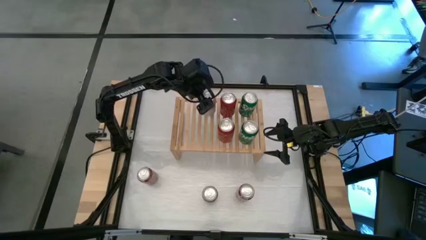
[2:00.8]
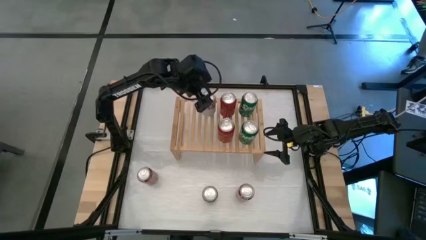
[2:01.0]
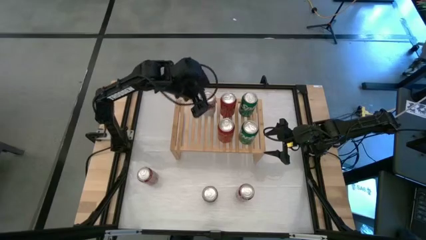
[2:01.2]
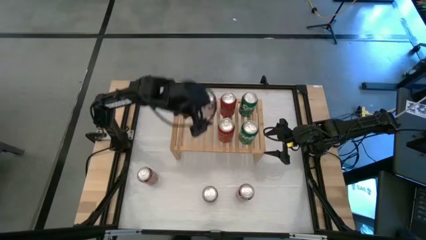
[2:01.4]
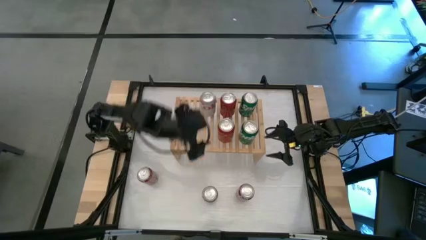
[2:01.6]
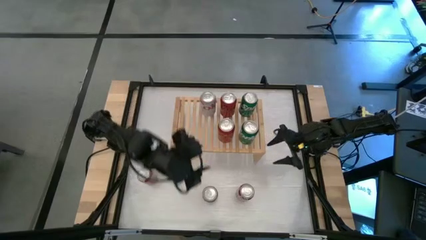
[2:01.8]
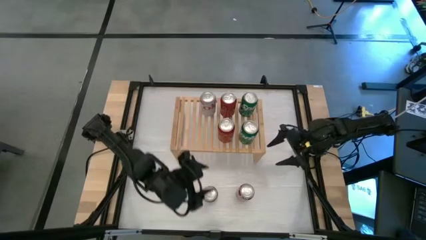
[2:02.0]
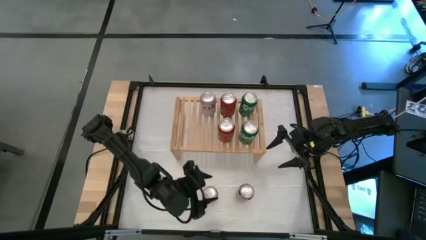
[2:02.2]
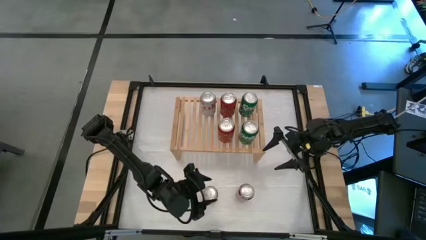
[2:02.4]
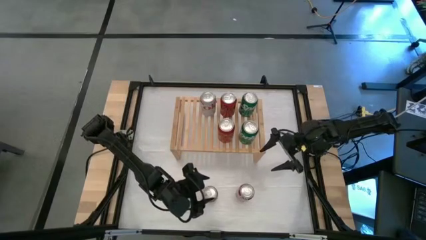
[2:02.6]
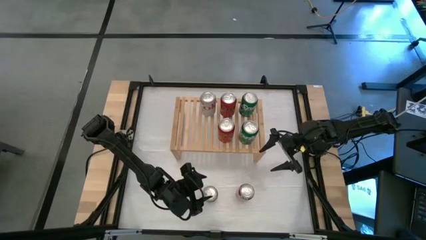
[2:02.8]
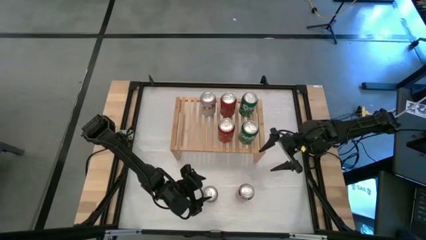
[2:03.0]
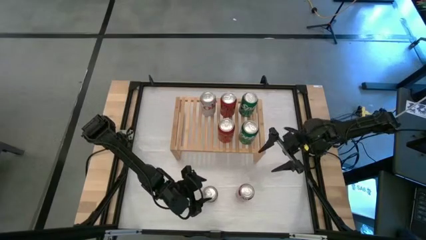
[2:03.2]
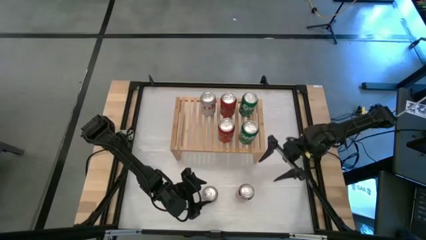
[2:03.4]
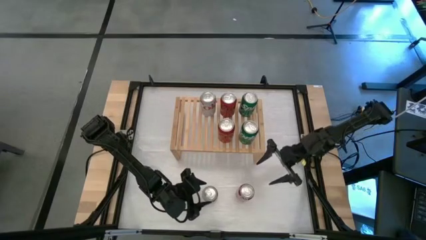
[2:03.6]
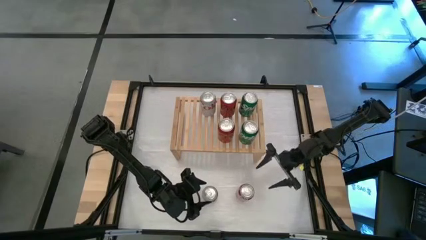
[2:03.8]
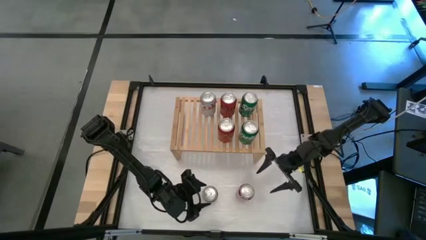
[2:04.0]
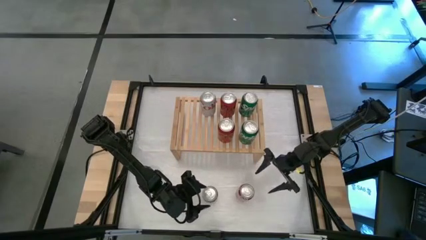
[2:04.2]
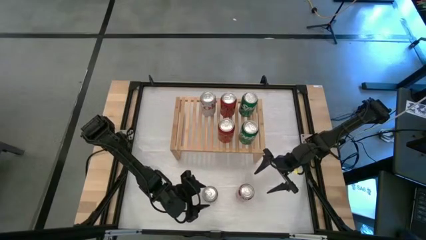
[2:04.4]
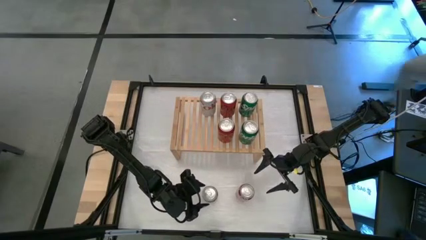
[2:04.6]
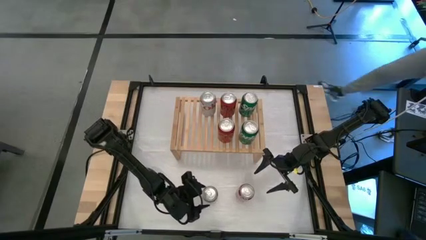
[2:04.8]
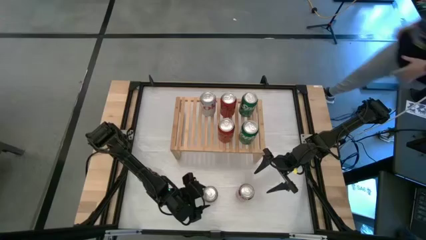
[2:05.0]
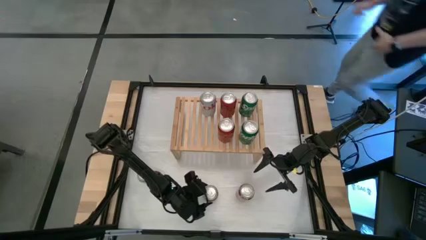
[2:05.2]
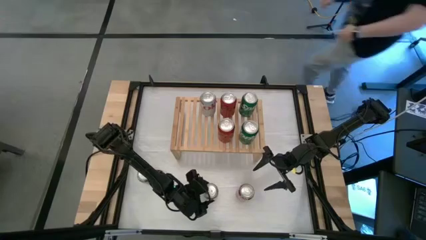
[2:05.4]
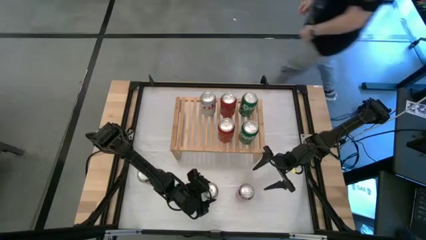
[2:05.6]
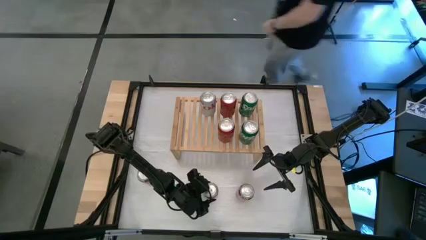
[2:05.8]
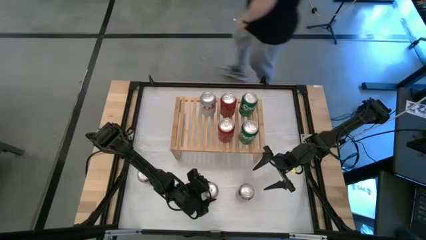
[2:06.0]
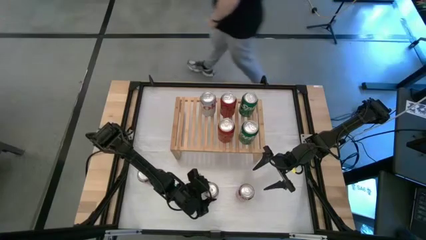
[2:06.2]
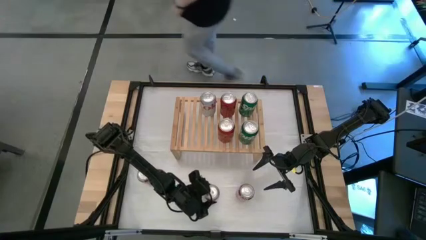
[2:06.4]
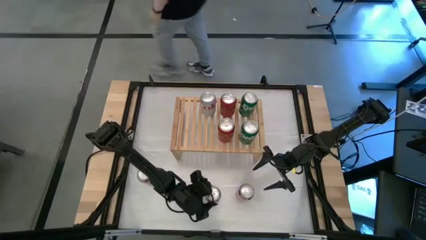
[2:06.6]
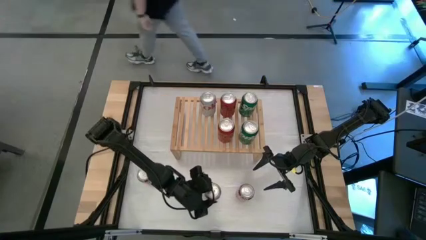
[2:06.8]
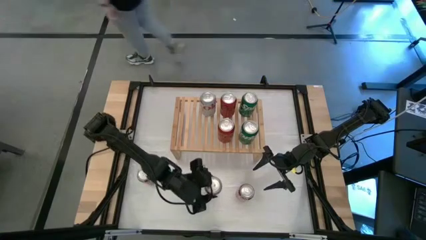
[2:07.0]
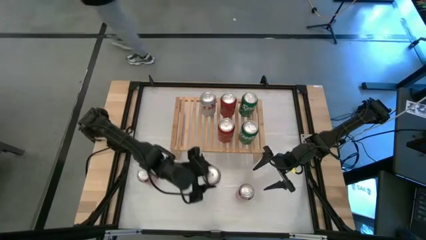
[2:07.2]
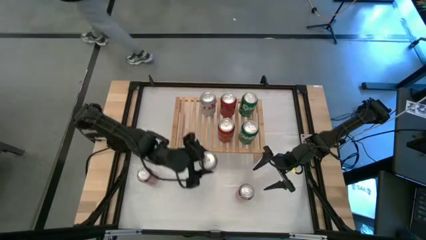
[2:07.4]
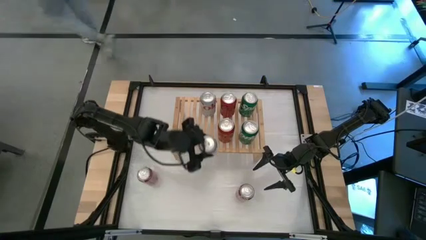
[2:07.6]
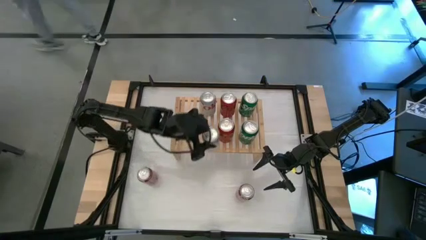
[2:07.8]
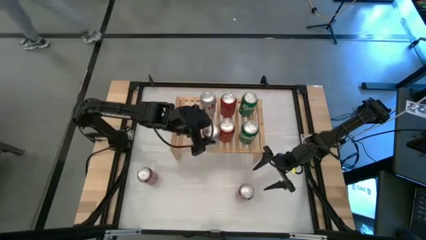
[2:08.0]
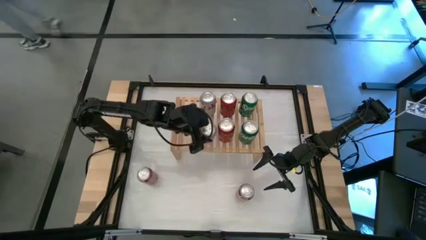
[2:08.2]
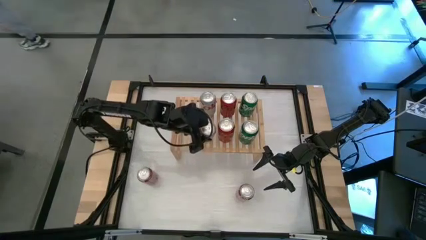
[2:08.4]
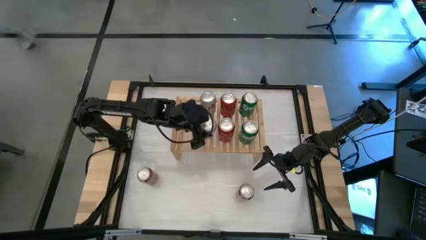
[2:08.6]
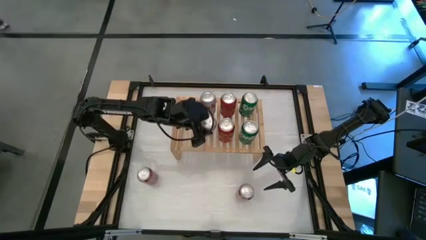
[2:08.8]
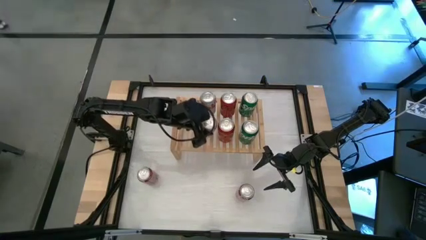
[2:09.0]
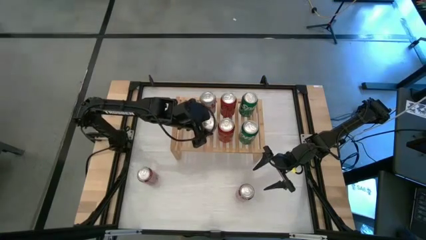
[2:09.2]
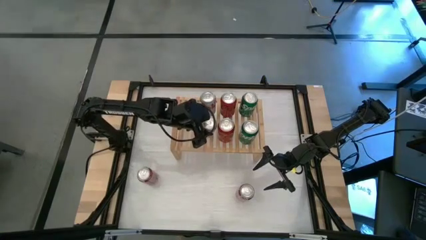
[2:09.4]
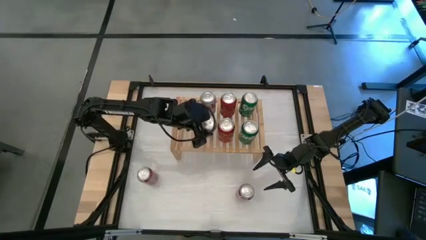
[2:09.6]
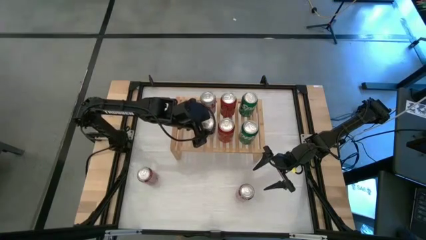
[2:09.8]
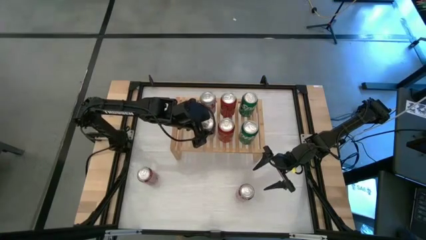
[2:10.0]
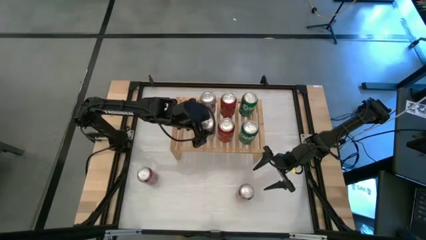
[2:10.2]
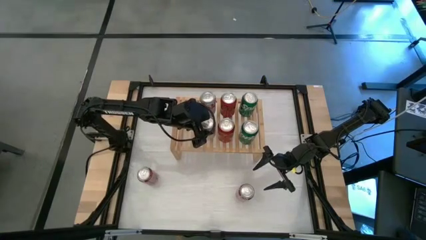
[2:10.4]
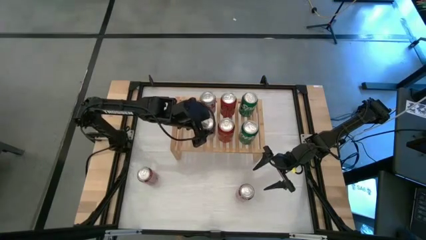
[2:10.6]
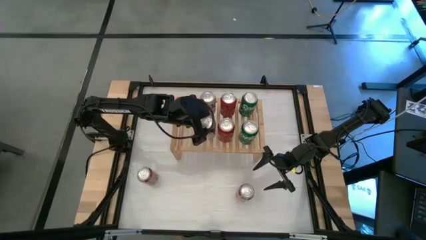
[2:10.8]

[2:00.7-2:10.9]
Task: Place canned beverage on shelf
Put the silver soda can on the shelf
